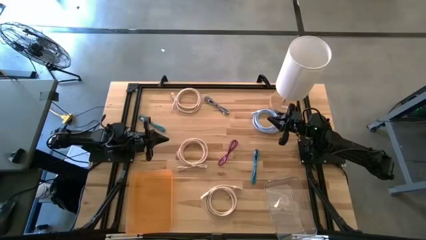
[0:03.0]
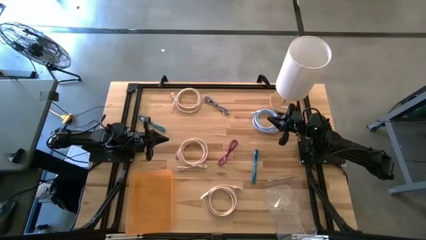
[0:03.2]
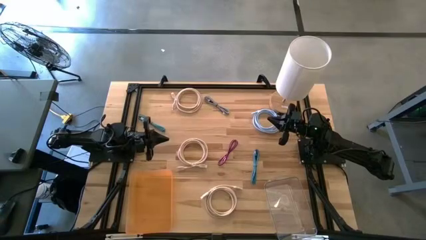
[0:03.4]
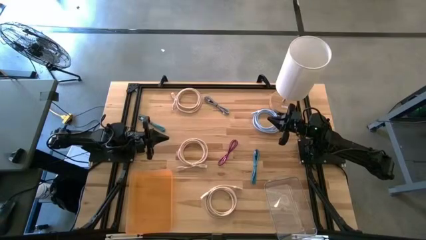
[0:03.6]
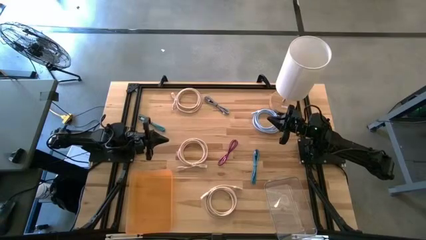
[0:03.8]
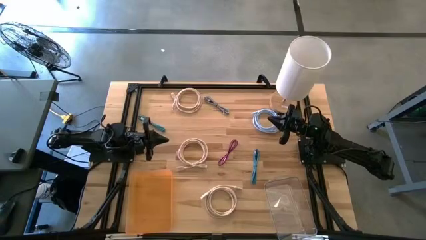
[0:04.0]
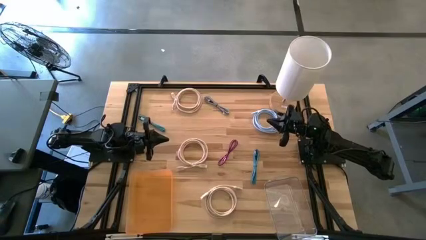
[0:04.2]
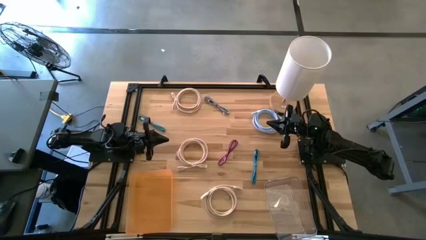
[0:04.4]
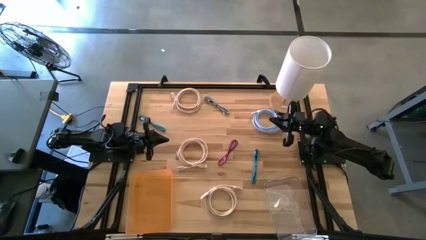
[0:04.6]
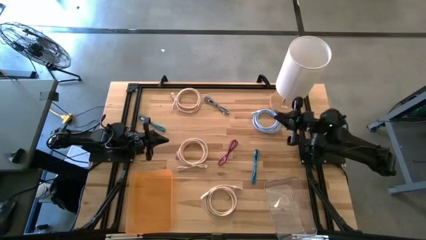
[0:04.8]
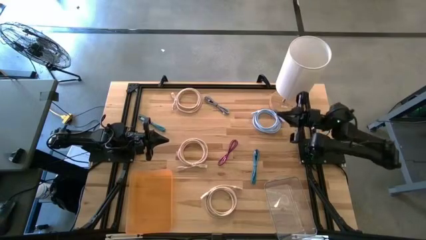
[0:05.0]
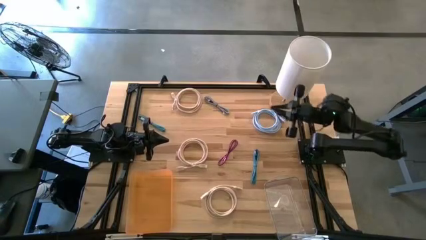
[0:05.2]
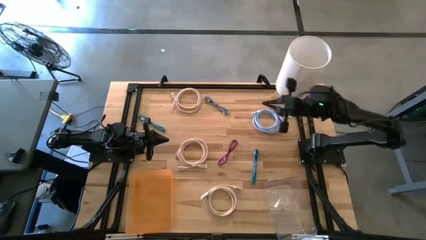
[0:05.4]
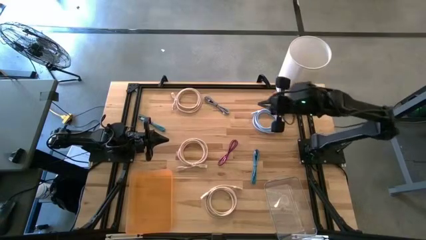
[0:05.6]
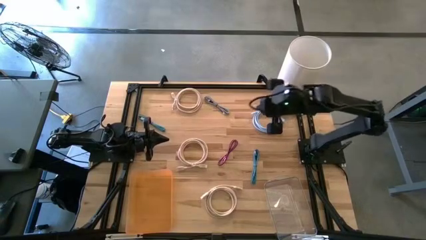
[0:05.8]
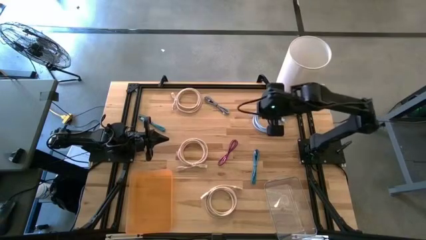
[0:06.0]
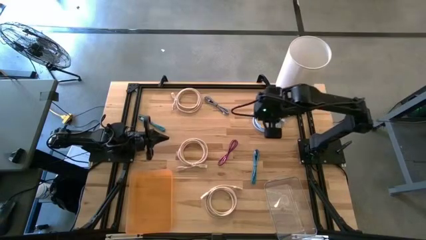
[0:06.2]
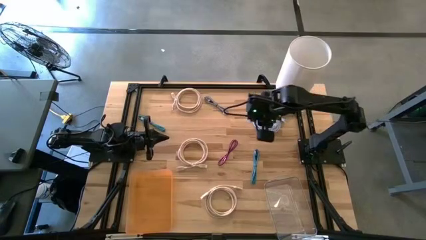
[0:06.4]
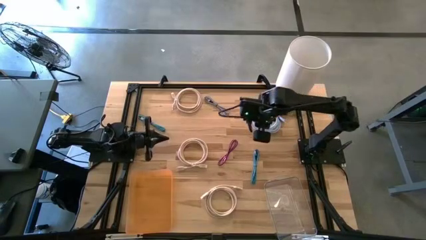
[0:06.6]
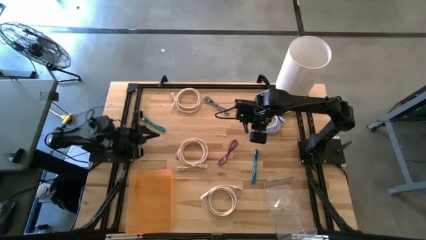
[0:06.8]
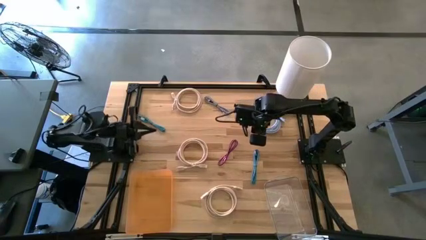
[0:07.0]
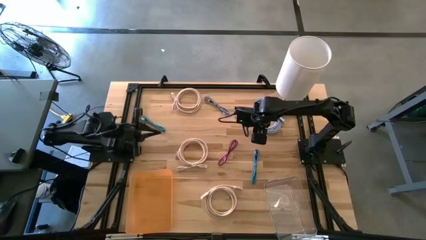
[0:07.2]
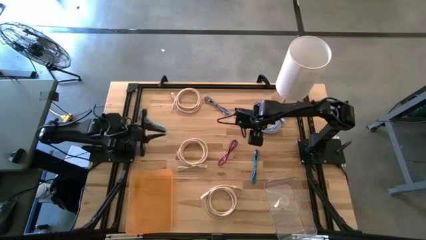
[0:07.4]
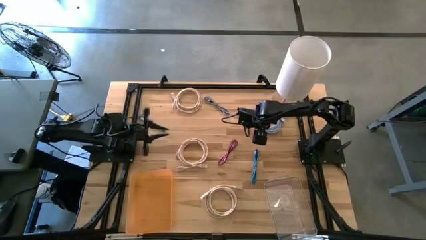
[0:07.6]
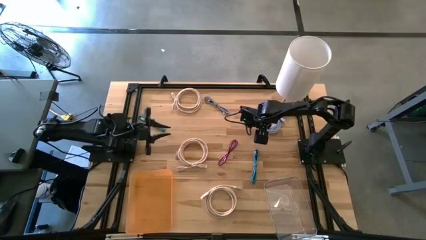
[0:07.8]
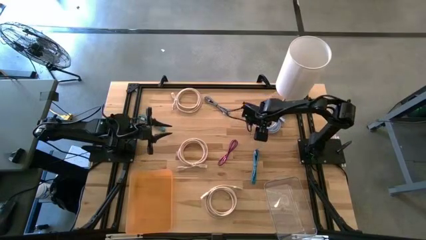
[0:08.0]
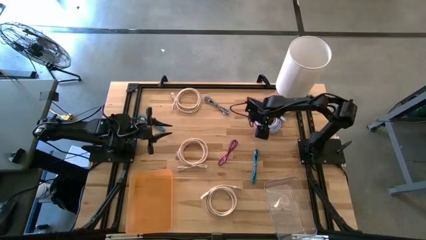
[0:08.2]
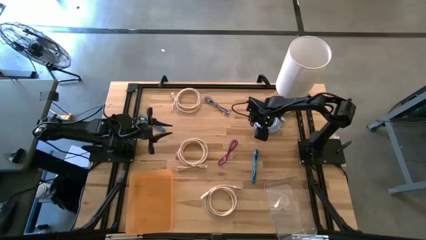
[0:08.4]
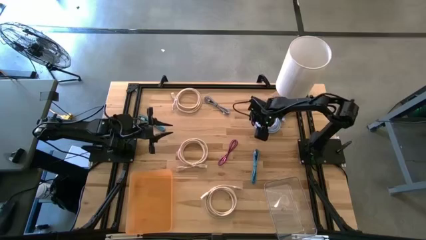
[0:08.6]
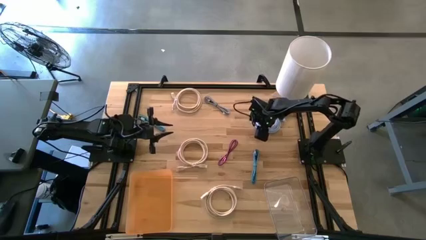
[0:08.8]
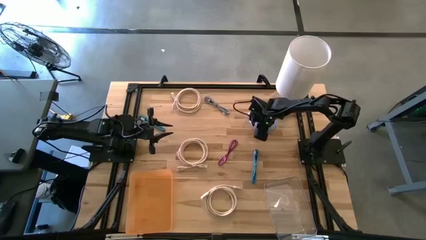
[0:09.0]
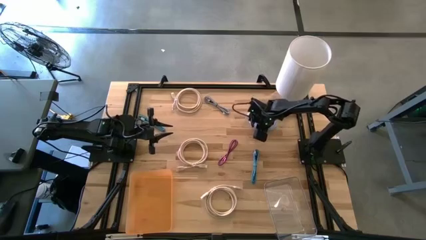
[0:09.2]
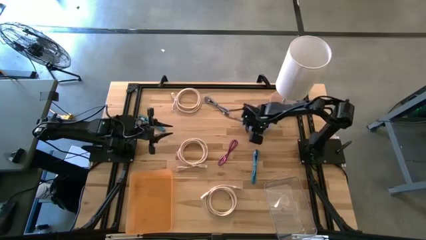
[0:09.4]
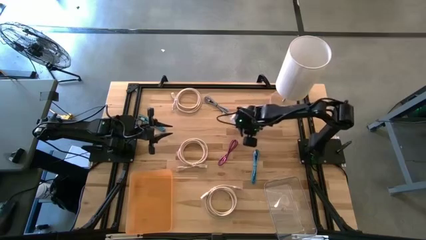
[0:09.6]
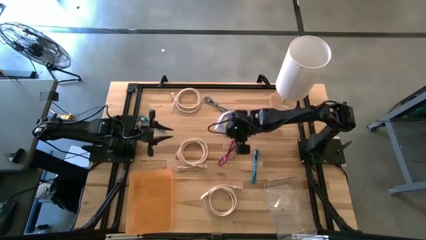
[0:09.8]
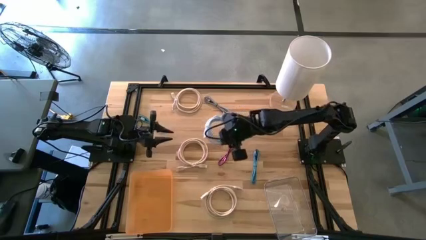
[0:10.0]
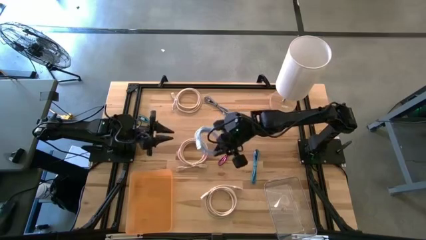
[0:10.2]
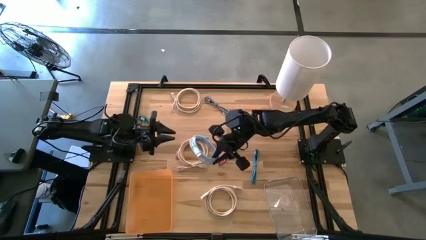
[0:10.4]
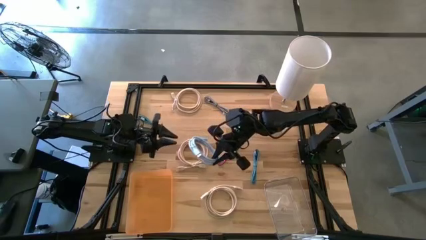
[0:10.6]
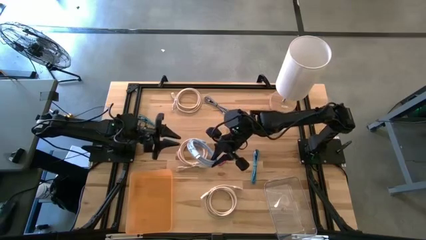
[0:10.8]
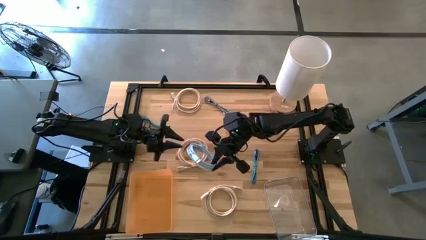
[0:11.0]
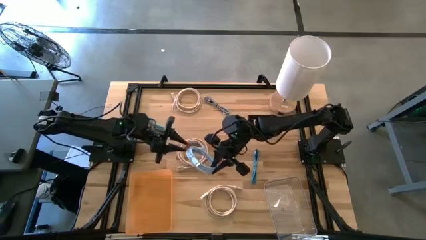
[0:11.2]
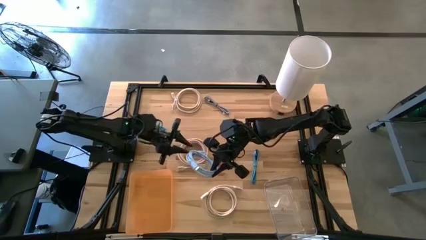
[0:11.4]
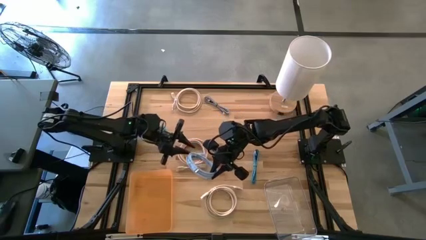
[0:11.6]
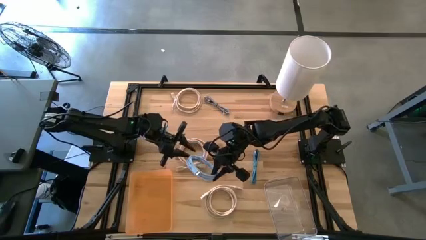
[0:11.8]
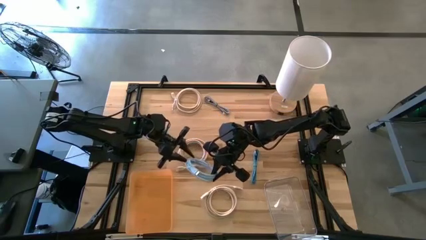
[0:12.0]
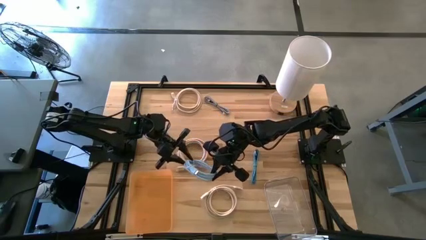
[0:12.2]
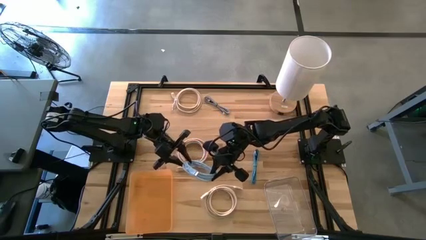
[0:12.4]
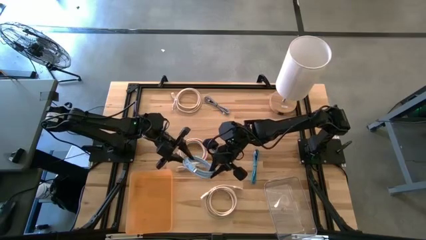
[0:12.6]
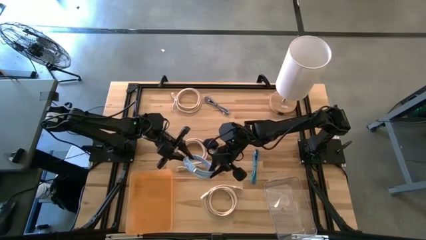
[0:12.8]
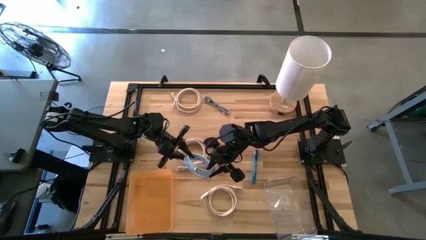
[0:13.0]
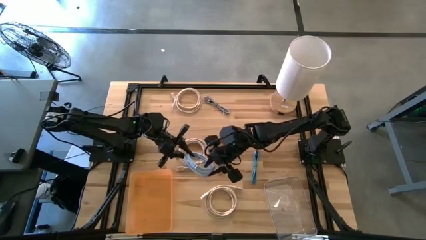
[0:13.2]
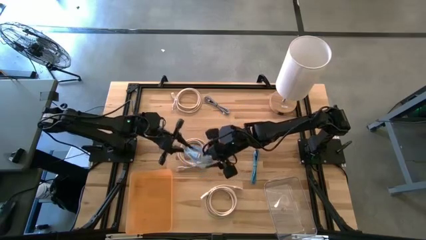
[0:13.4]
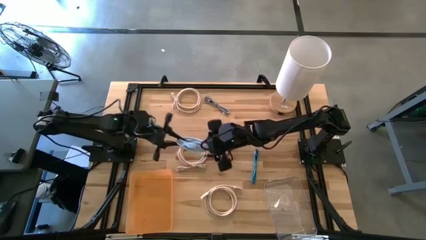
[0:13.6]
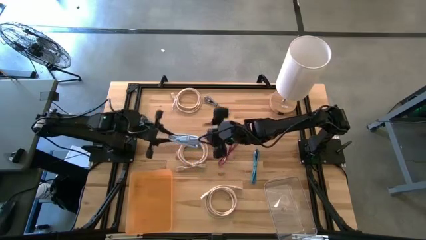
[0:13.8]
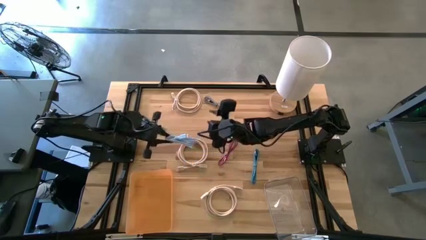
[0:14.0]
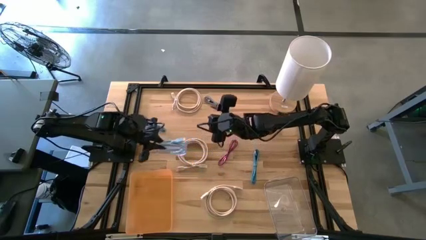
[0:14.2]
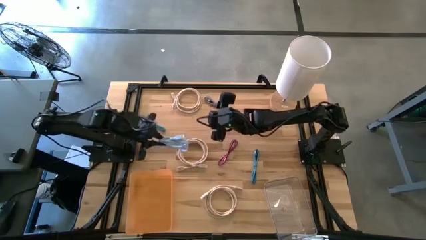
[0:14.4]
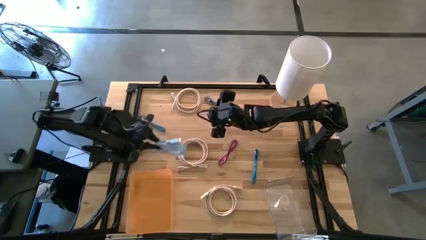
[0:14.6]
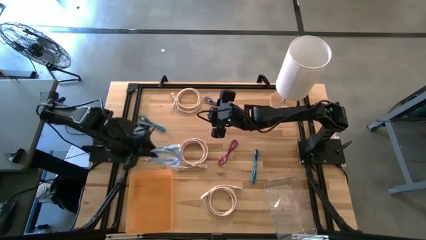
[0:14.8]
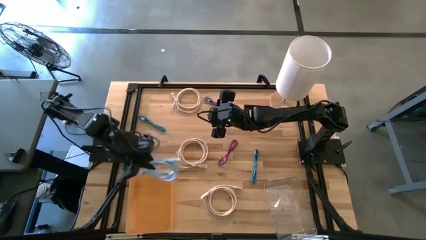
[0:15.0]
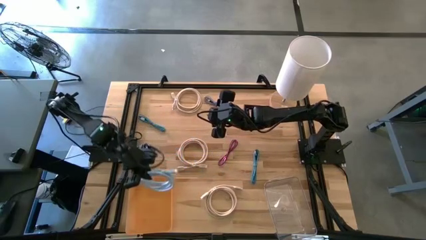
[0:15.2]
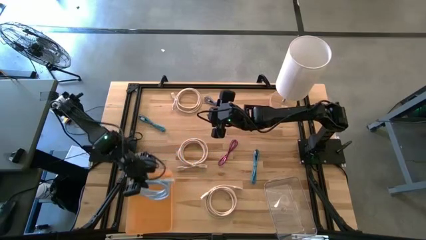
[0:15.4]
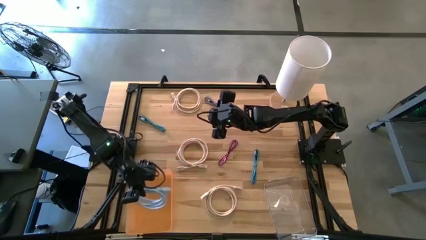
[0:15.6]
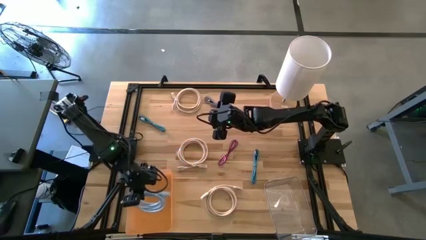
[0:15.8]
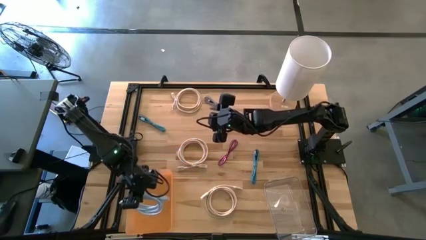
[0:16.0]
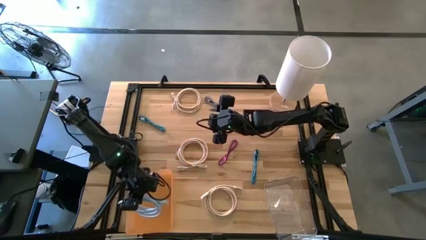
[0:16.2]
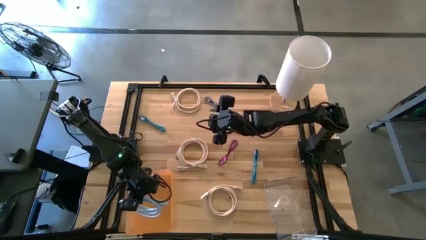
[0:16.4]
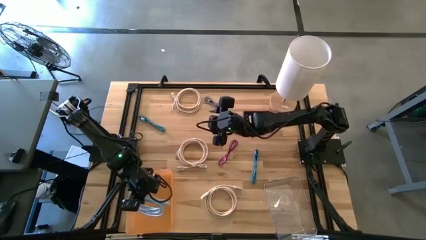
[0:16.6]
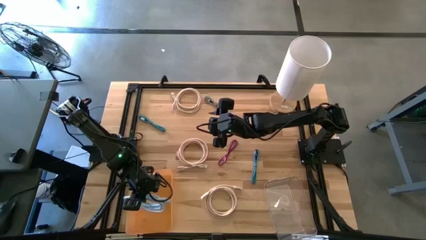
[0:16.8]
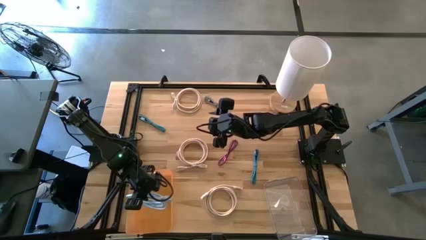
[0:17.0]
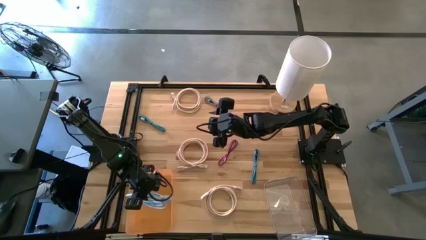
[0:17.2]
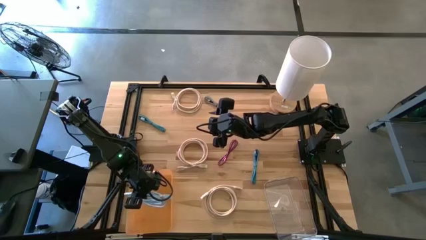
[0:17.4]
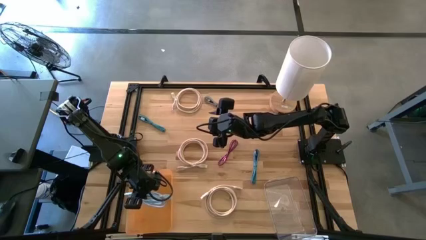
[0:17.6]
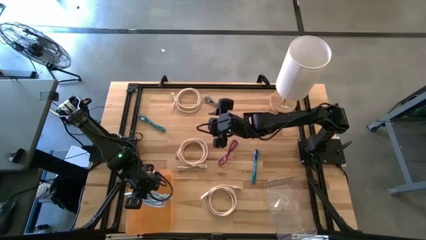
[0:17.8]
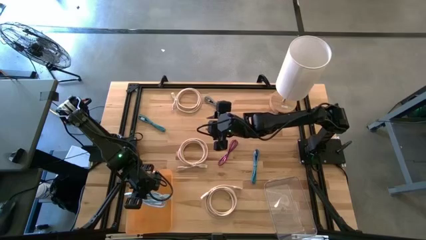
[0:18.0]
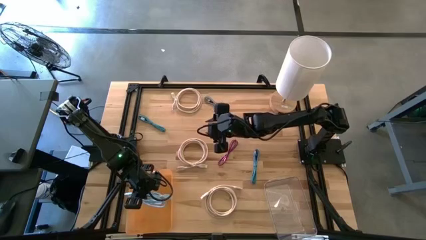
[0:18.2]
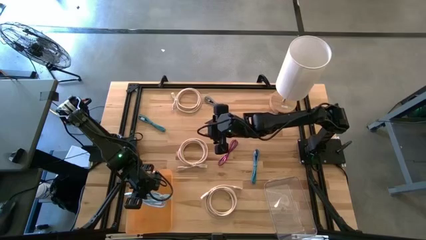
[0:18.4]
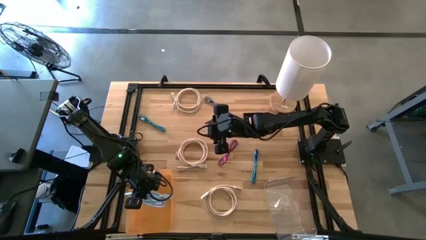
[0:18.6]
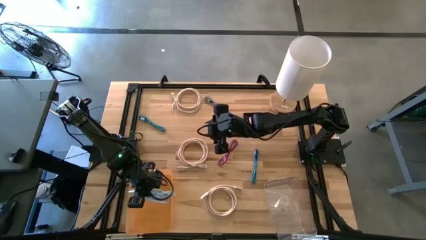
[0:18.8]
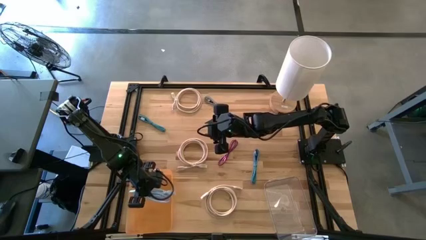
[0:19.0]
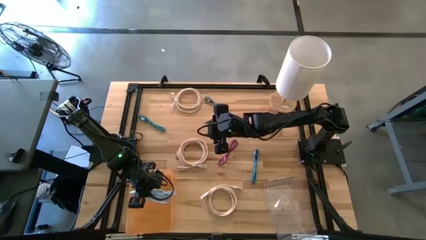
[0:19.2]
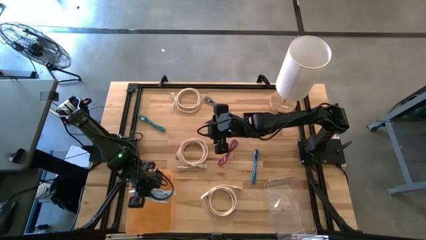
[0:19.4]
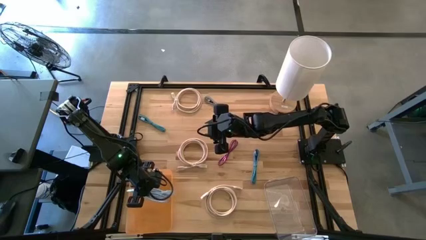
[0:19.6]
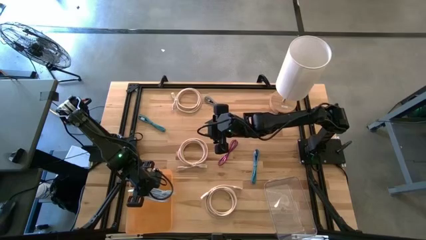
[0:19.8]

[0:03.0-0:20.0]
Task: Pick & Place USB Port
Put the light blue HDMI cable into the orange bin
